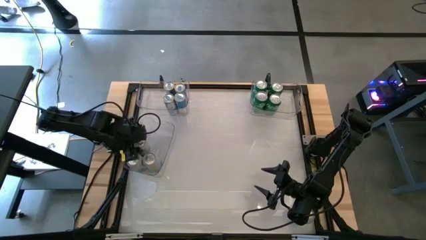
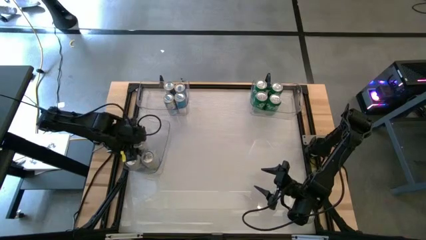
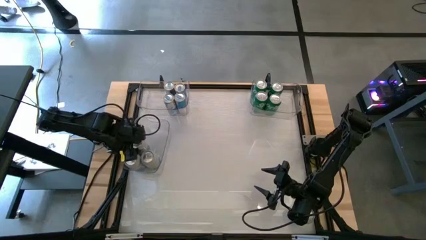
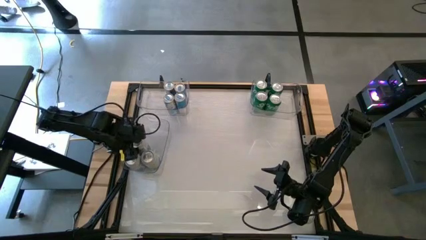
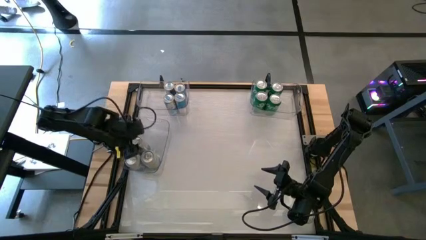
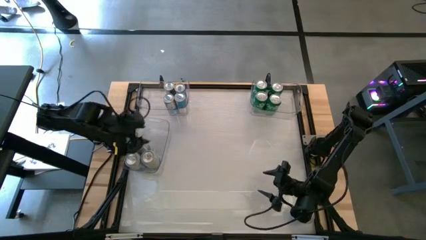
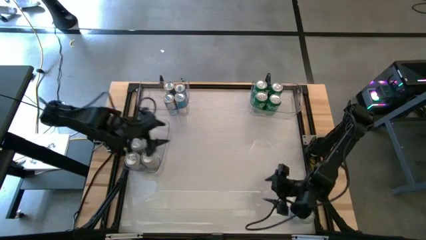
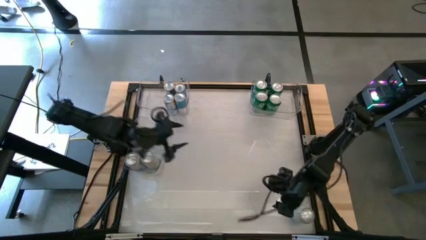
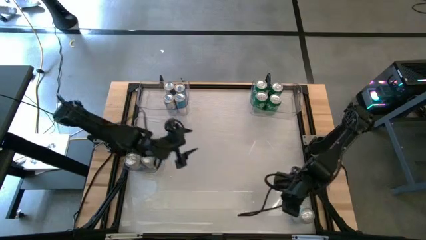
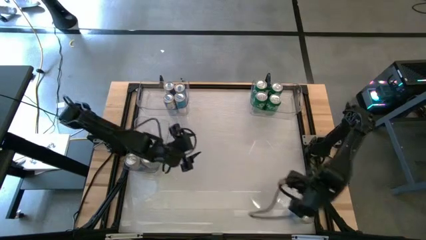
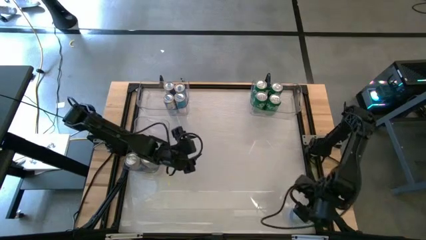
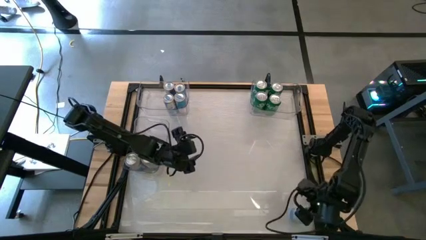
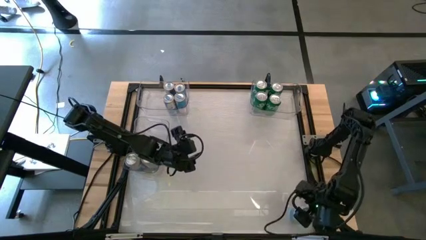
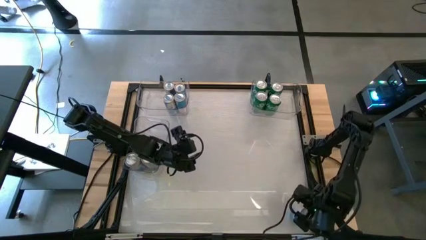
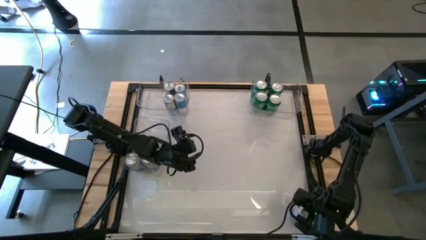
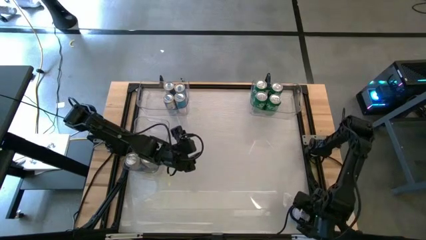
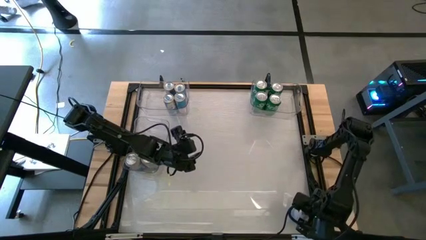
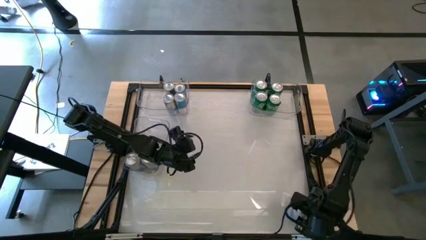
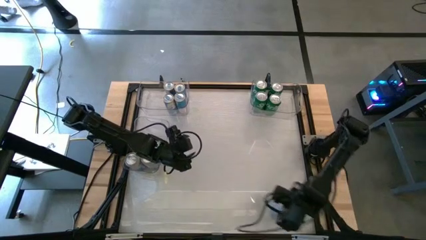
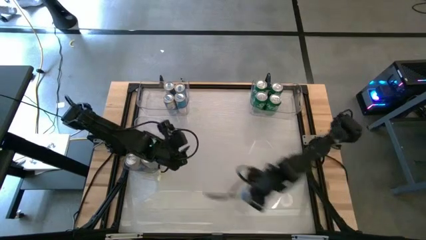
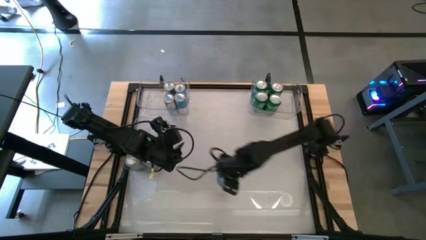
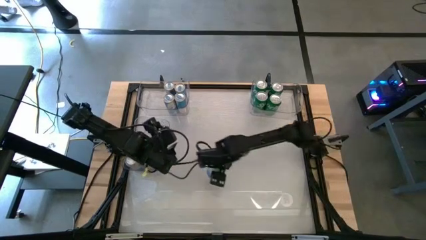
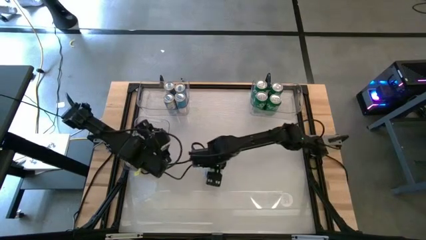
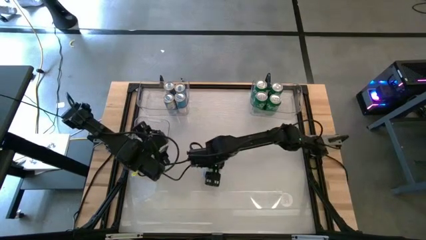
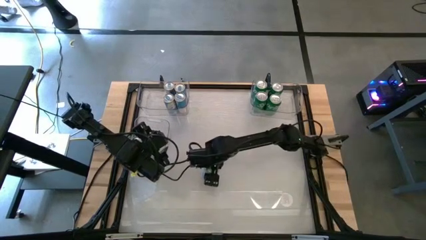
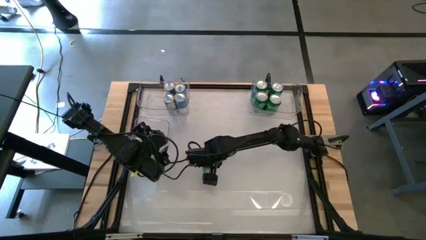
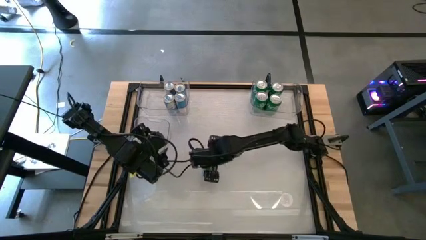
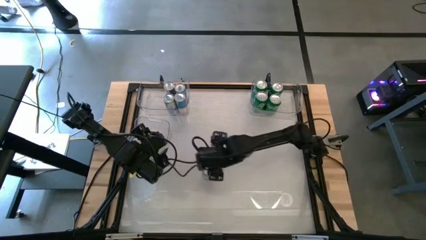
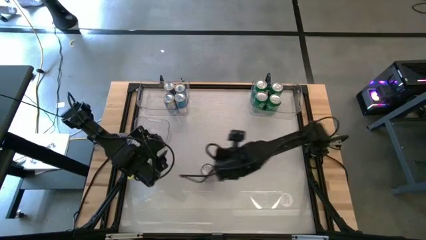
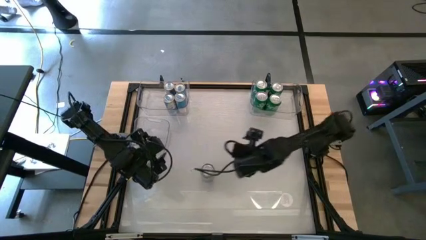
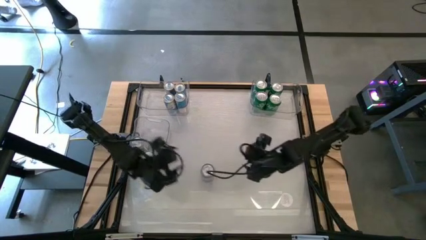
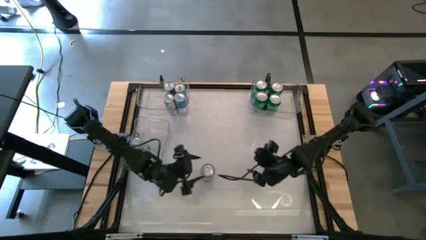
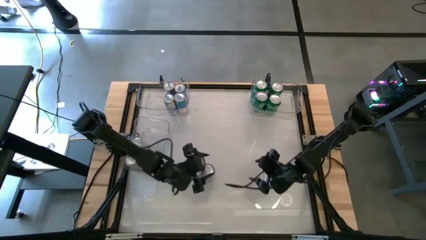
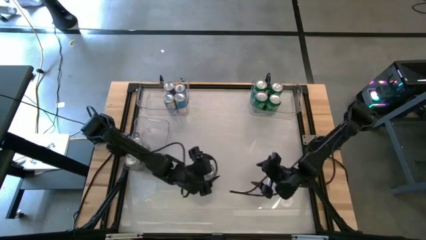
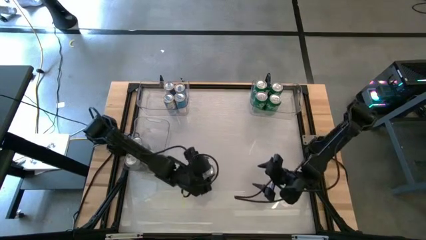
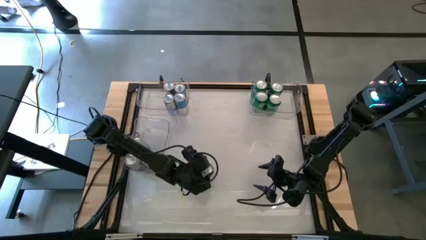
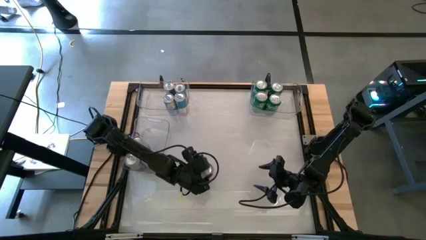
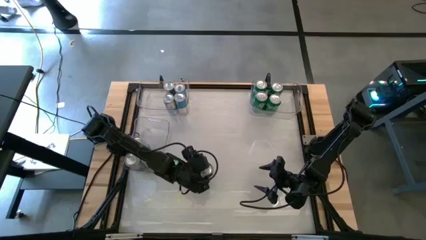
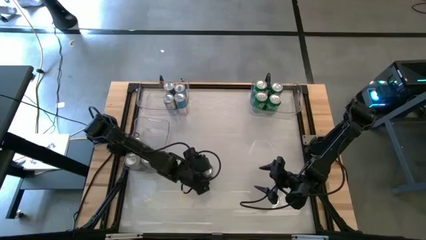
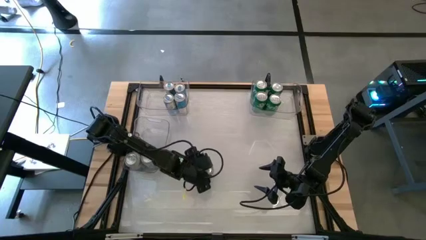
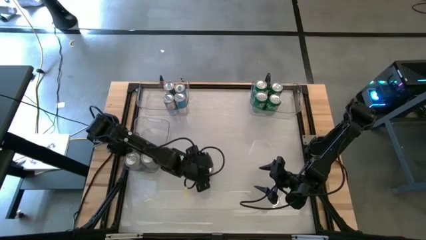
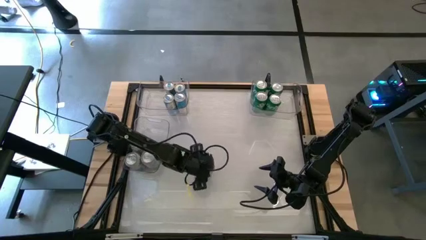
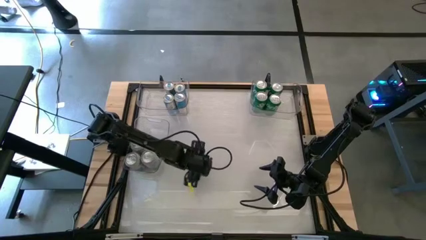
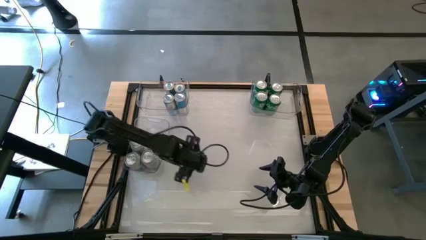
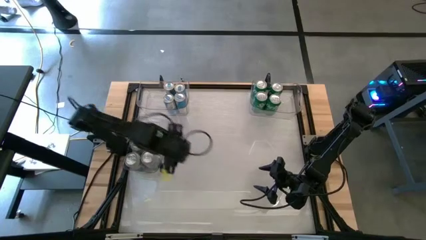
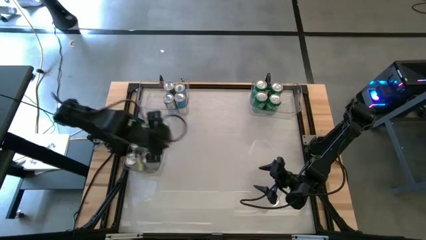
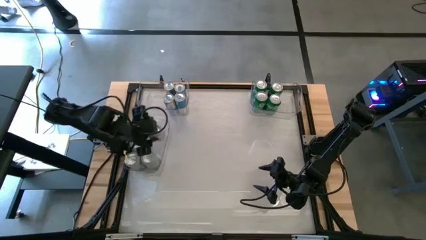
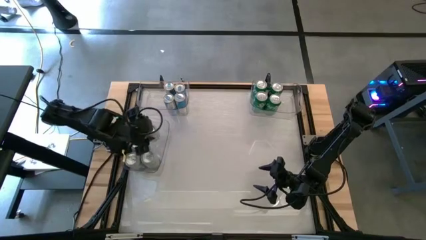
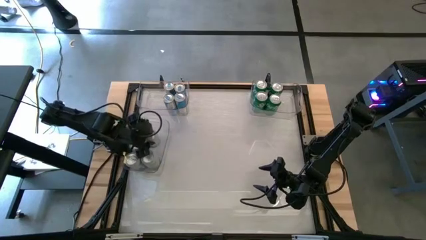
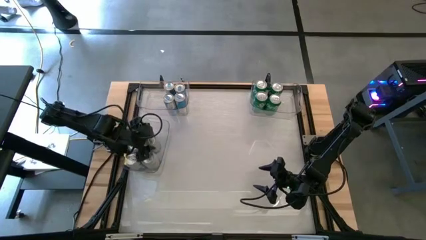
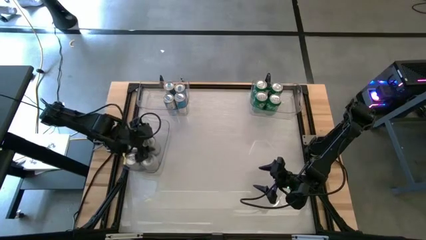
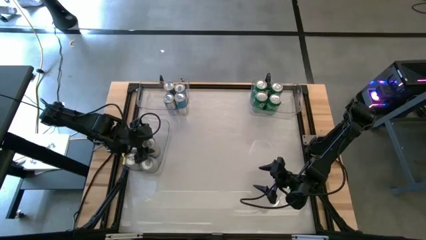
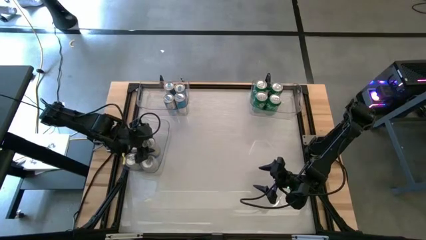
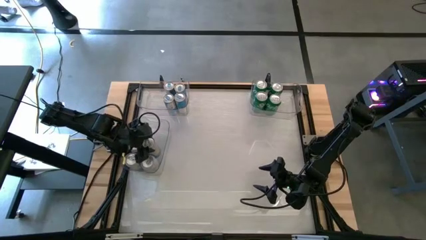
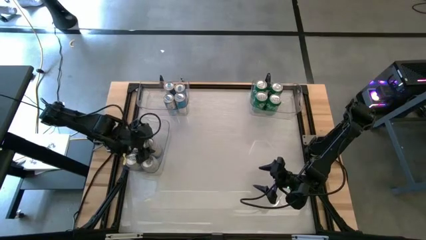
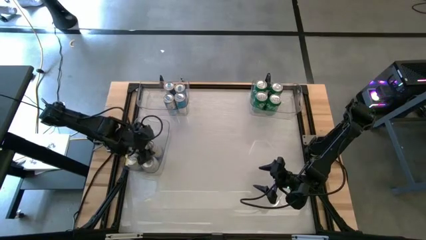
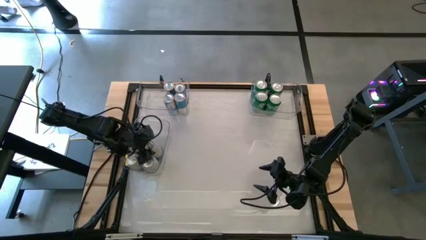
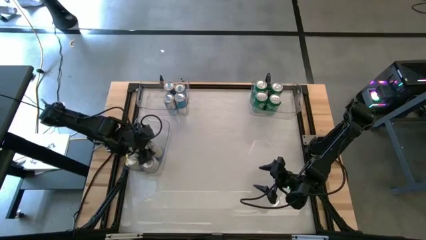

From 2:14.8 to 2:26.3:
Task: Sort soda cans
Put the blue-white soda can into the middle bottom transparent bin

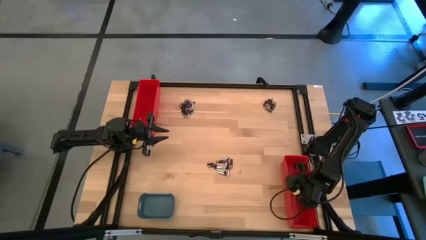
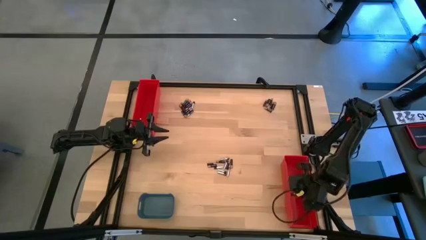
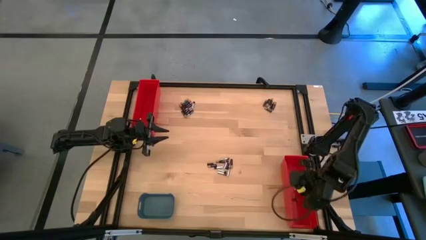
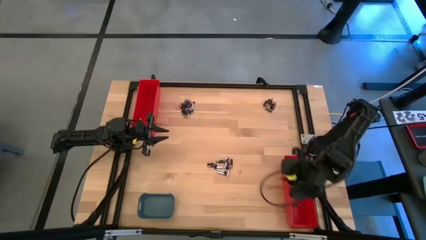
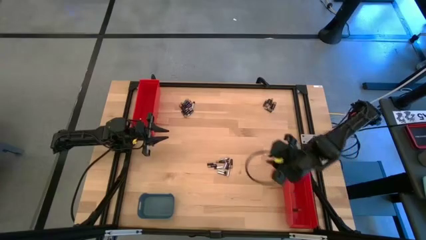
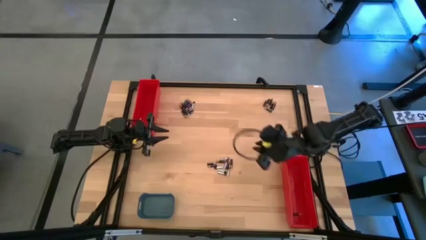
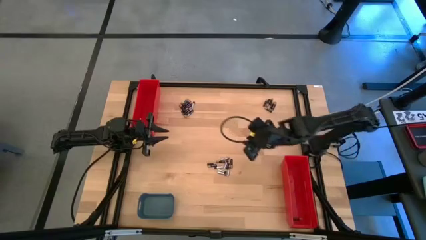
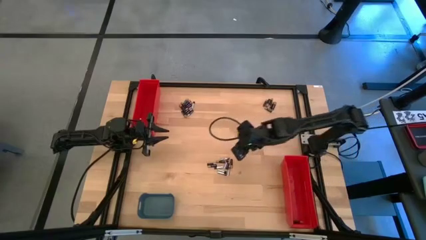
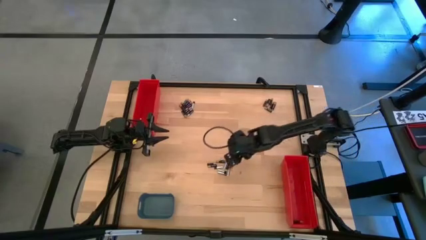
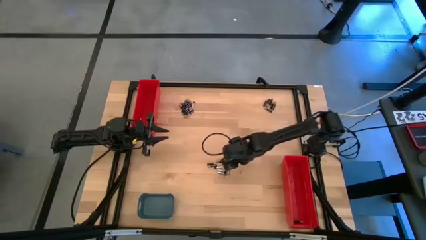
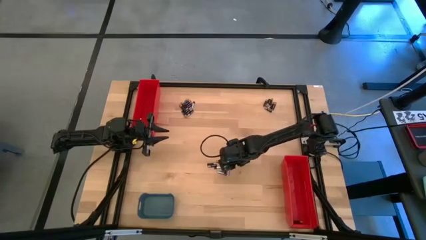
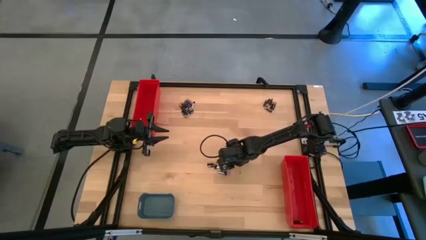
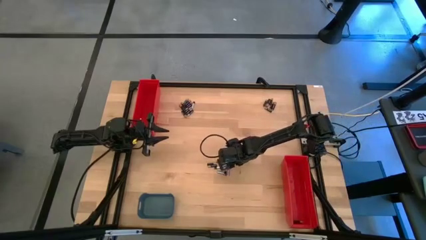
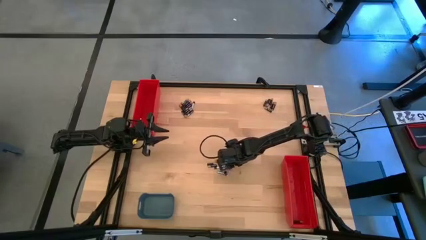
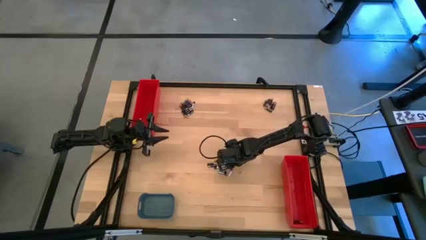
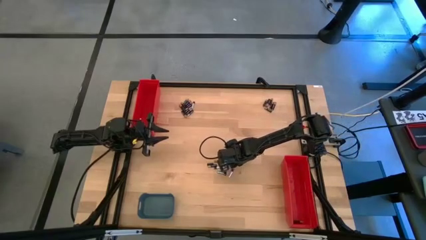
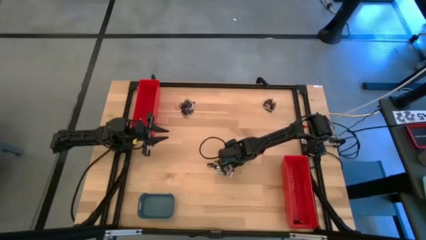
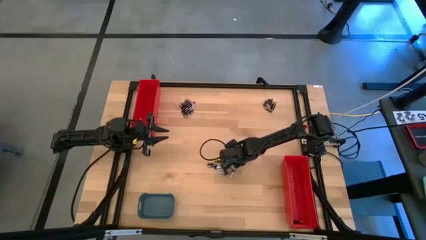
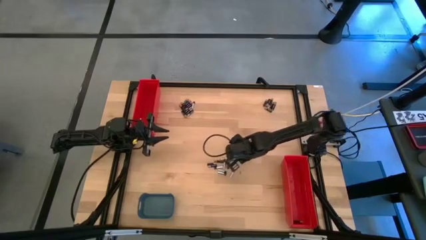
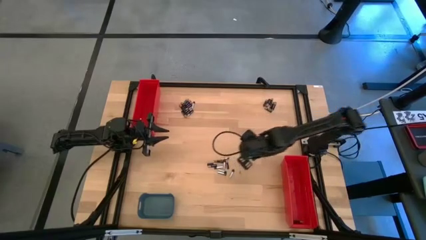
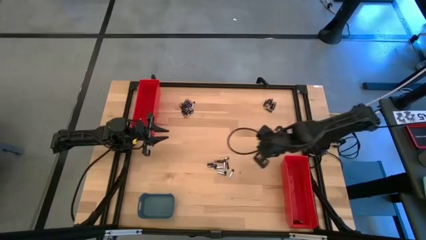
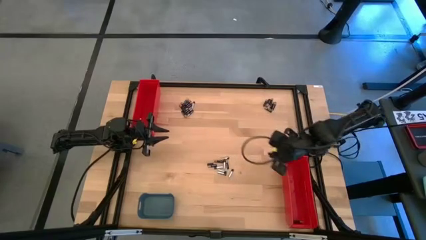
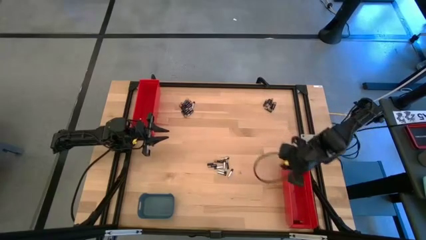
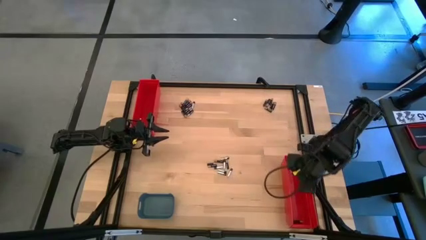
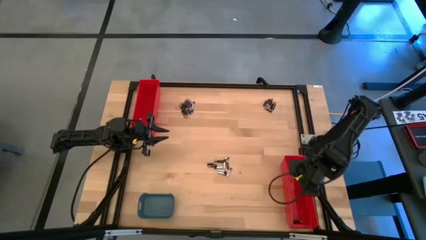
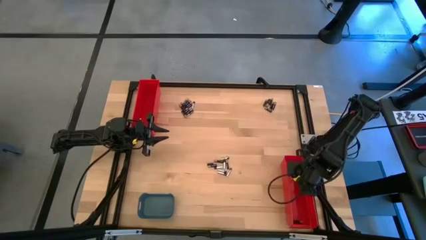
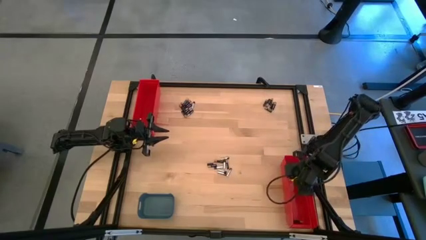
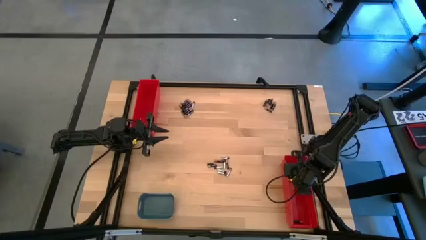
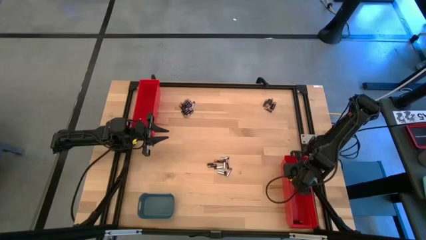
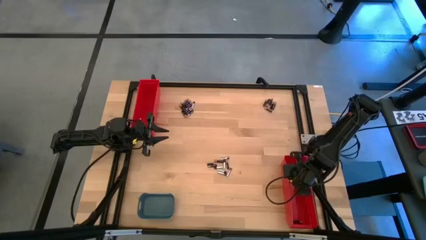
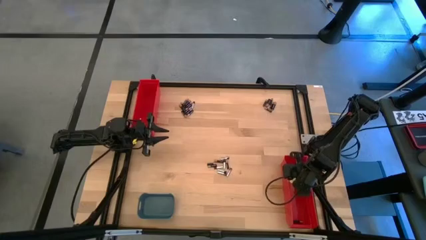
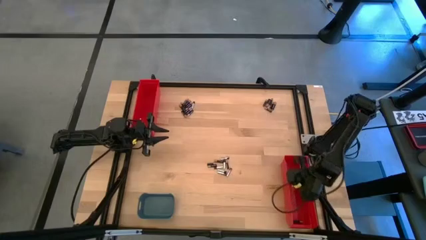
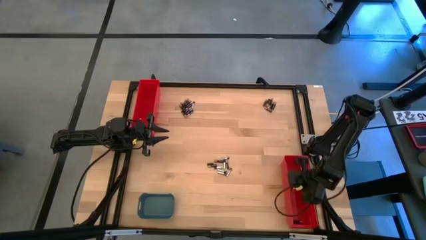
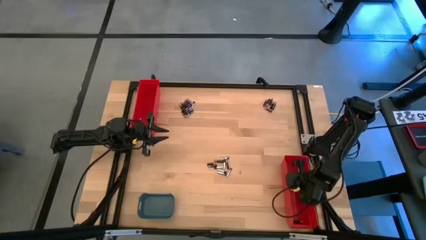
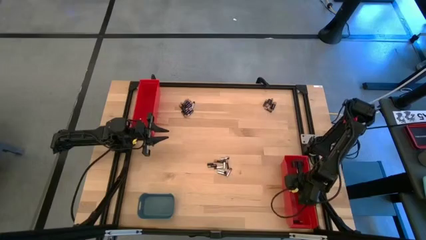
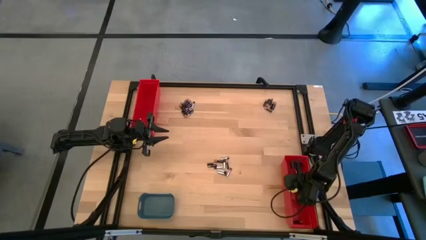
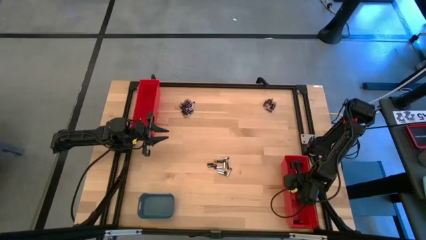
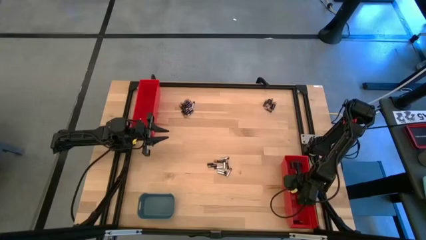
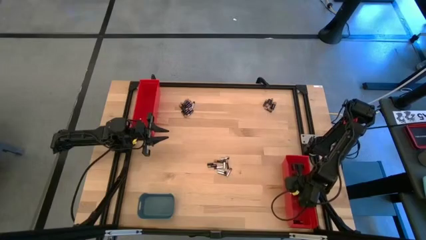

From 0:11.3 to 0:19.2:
Task: Sort batteries
Put the small black battery into the bottom red bin
